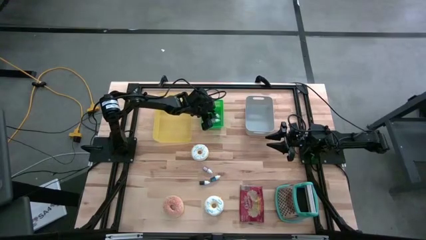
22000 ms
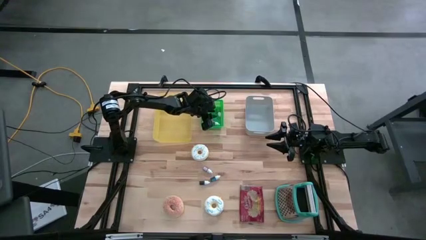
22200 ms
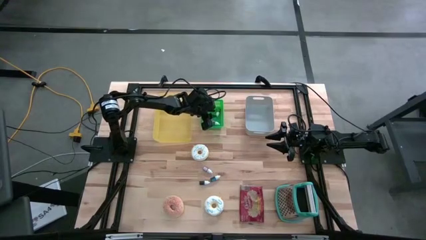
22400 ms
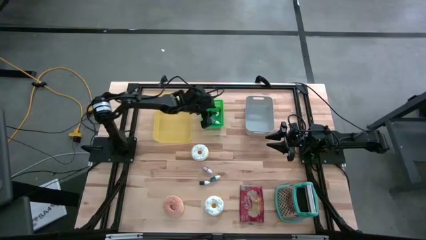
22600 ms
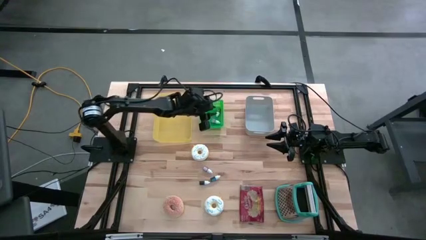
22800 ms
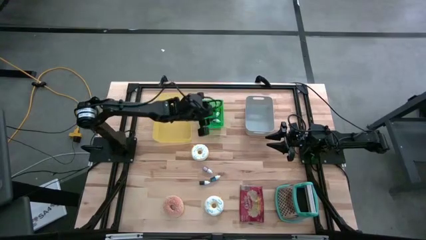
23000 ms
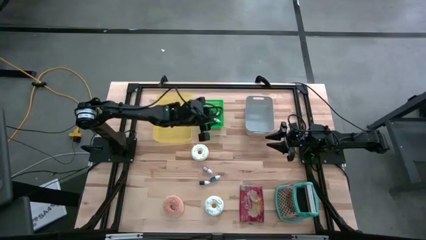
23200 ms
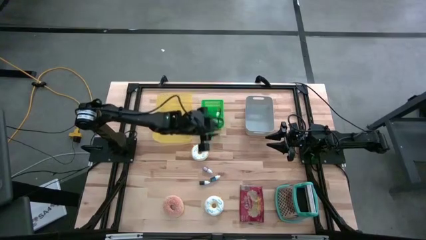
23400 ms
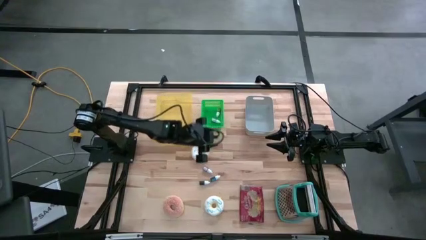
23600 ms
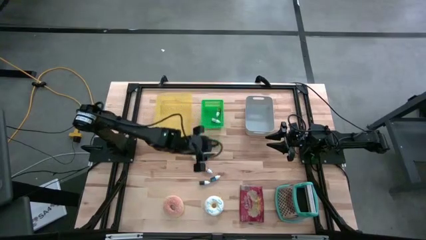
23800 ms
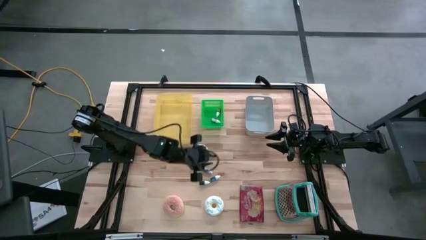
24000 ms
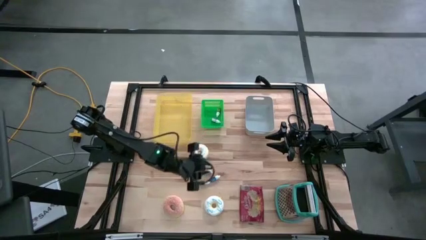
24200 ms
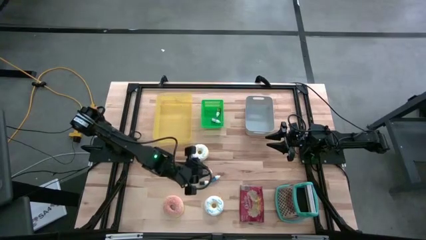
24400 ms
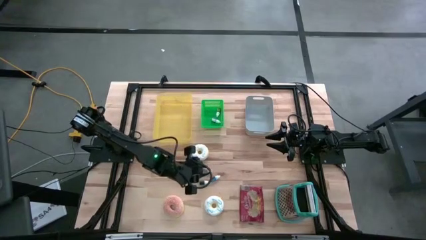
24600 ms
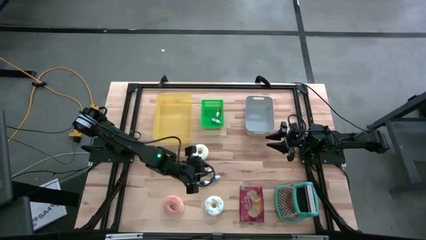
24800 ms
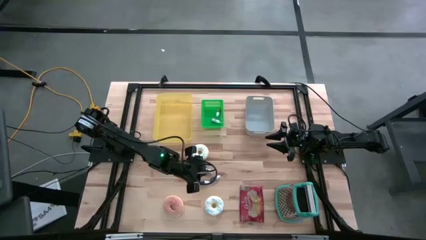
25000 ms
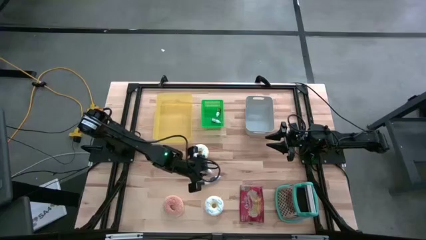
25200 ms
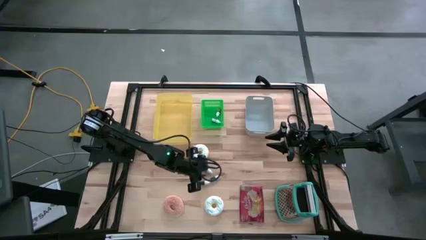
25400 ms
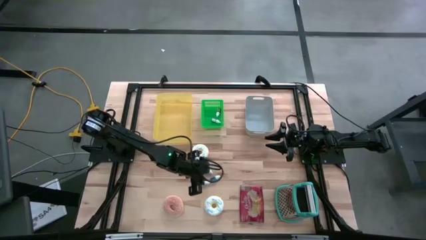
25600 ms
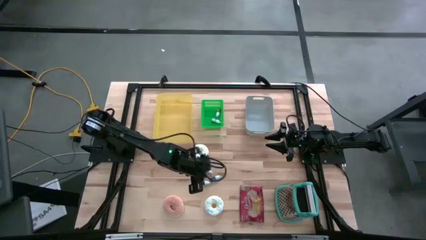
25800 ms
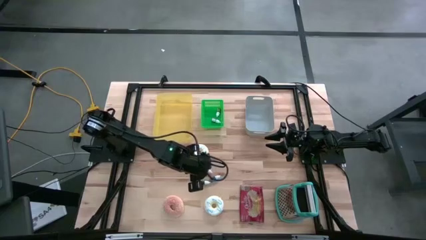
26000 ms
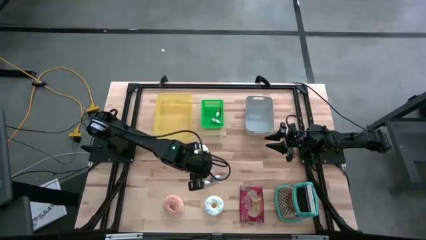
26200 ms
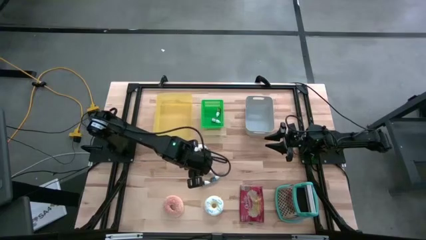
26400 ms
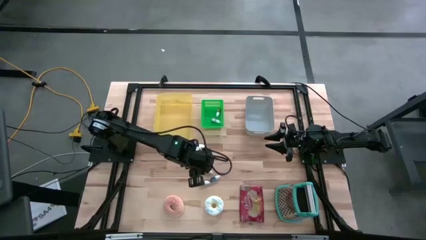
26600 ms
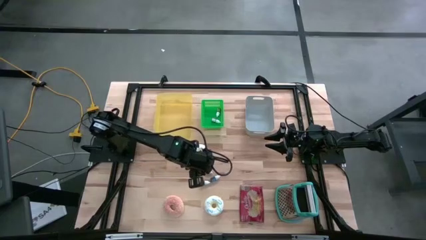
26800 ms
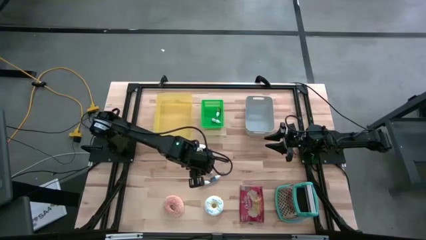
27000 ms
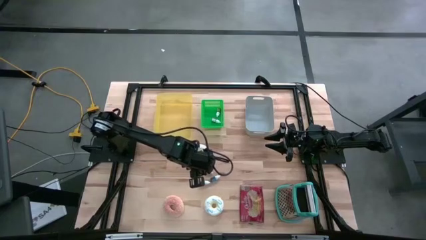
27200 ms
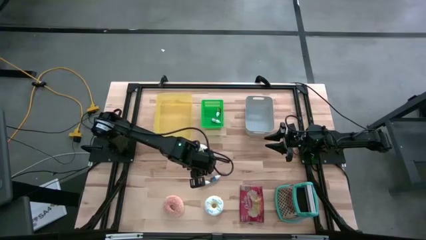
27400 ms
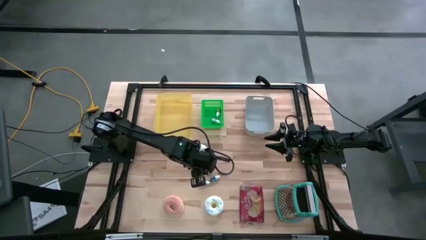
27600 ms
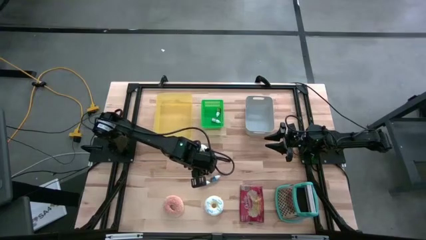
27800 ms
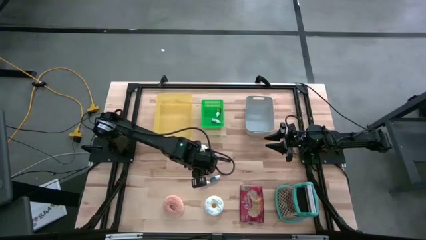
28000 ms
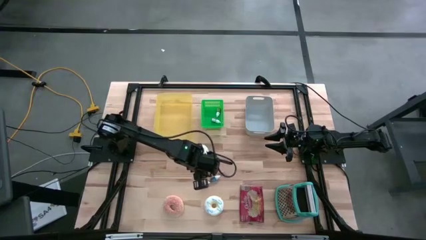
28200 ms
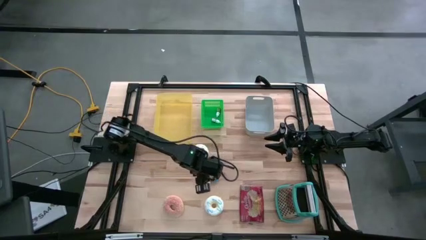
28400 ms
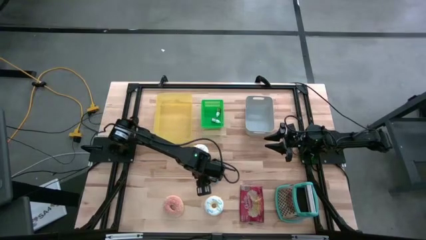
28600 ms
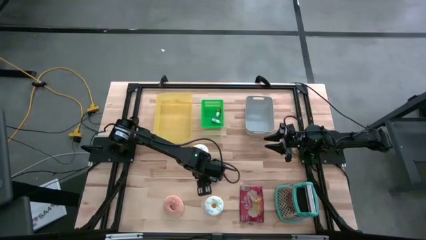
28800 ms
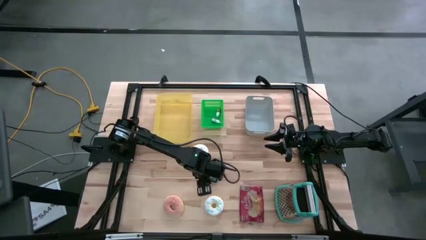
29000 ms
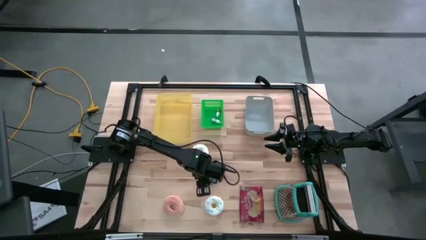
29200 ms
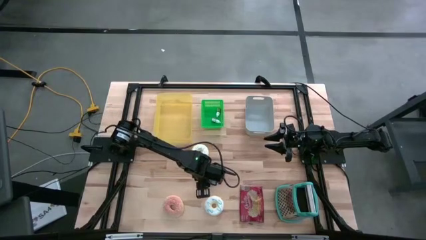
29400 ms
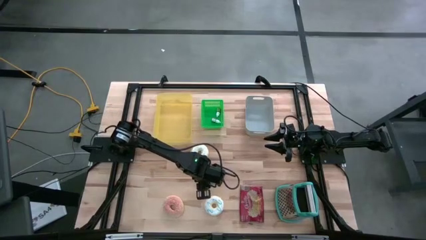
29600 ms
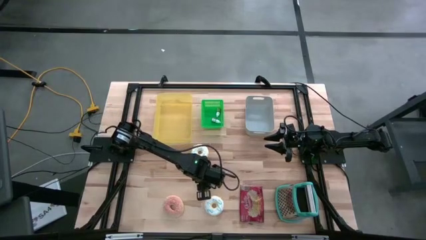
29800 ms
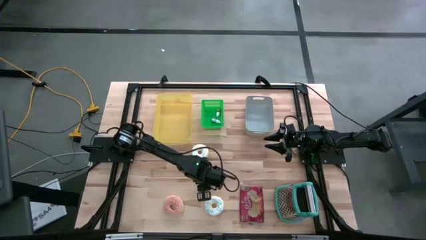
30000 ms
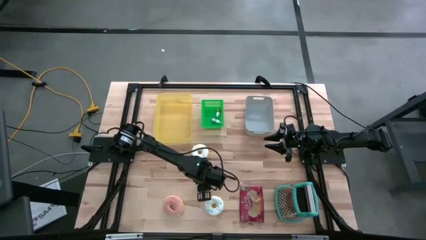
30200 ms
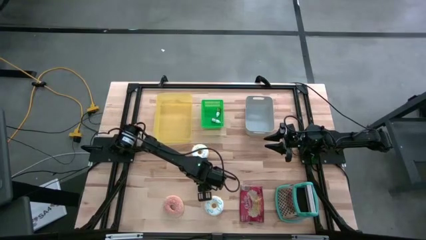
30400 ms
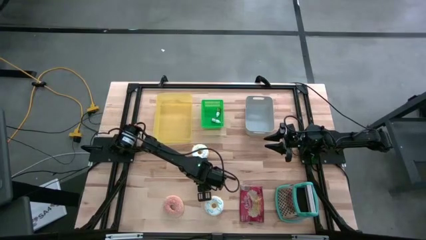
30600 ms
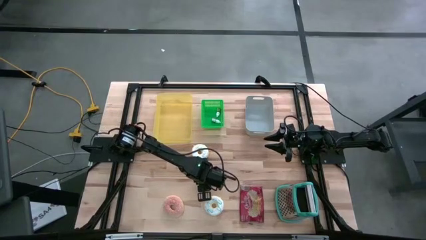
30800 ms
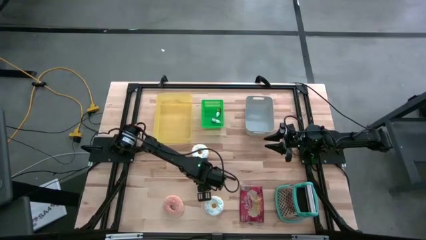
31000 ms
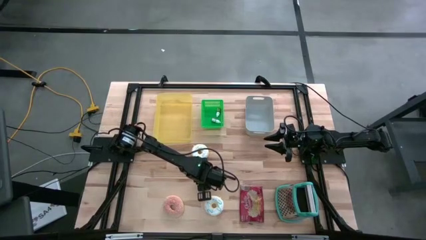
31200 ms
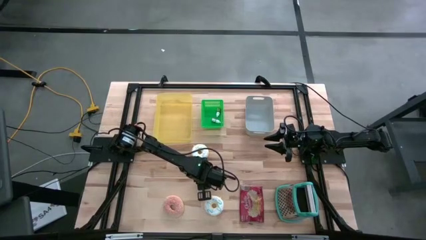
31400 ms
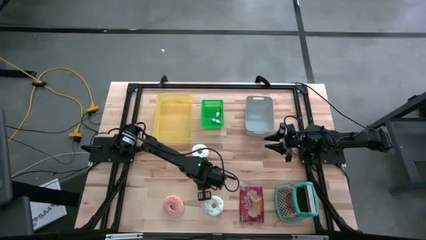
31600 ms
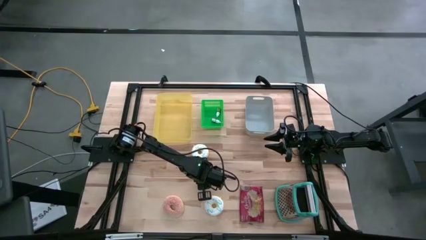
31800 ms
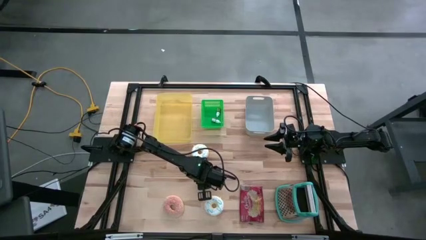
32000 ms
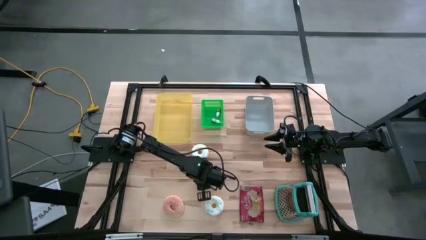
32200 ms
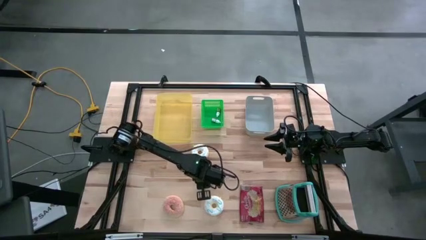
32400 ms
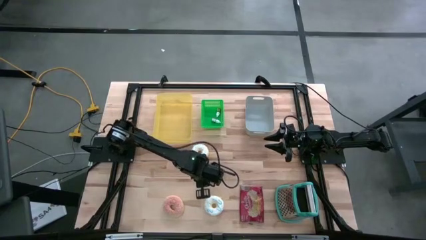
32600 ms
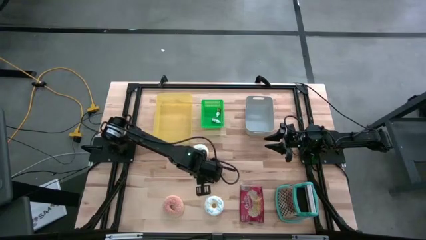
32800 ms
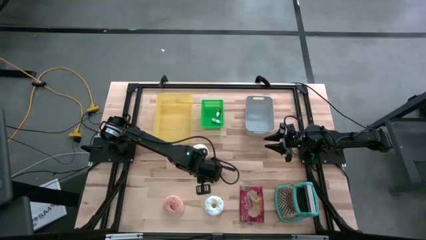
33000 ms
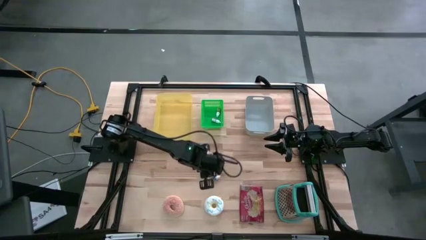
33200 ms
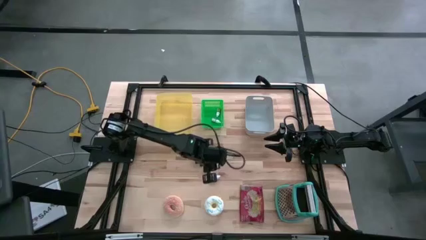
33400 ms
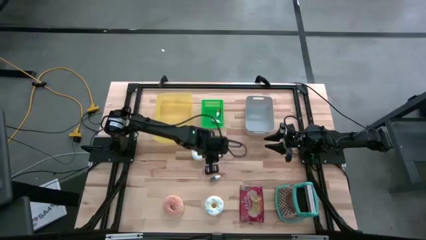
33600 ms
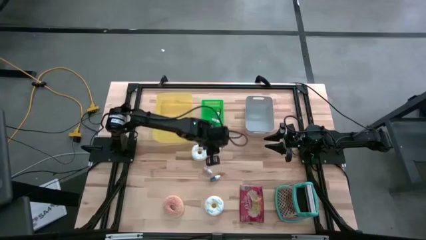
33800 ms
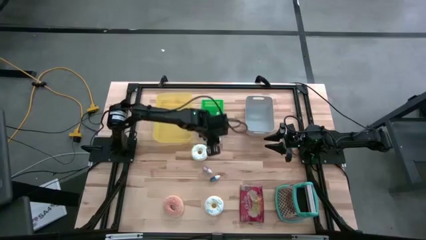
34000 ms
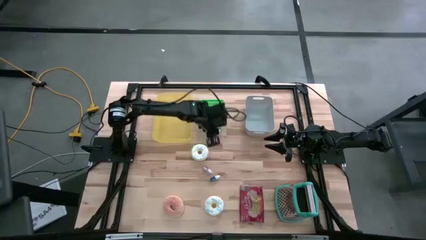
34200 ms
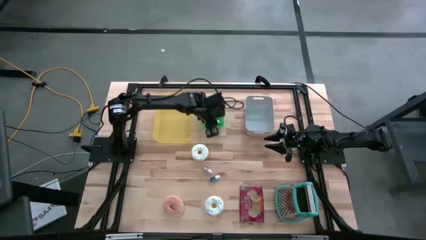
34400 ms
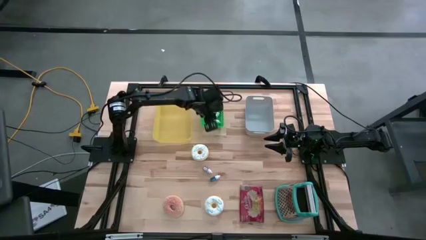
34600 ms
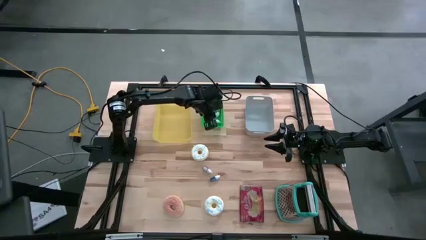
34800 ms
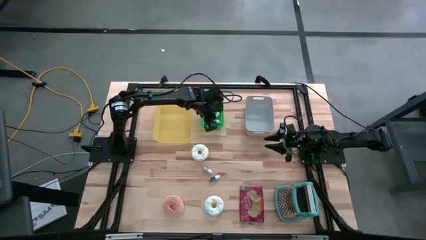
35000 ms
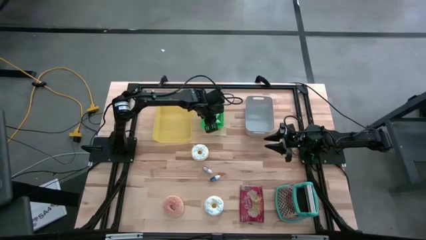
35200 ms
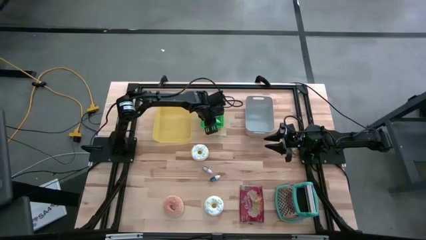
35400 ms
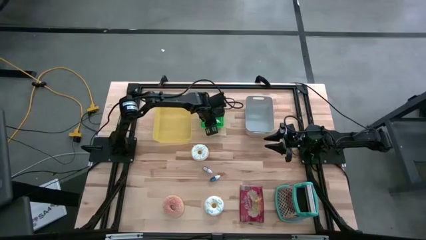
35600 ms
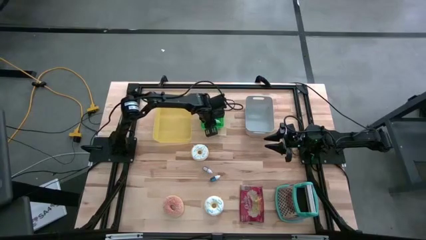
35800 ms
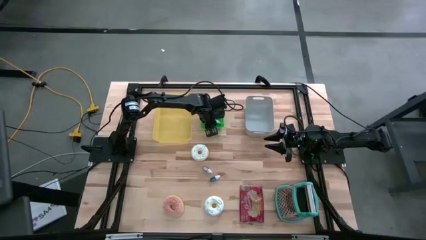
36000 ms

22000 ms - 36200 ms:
Put the green food coloring bottle into the green bin
